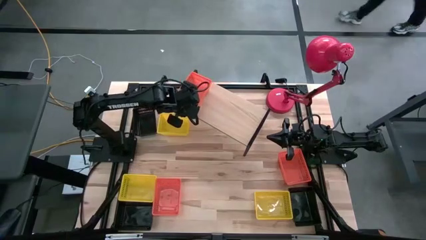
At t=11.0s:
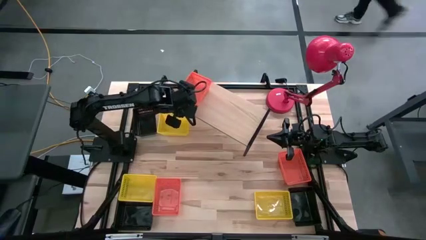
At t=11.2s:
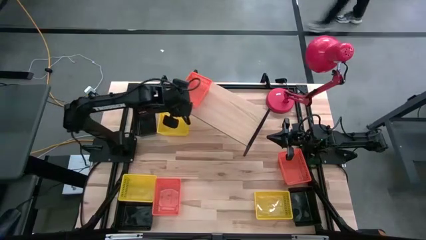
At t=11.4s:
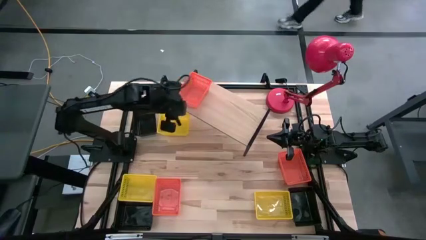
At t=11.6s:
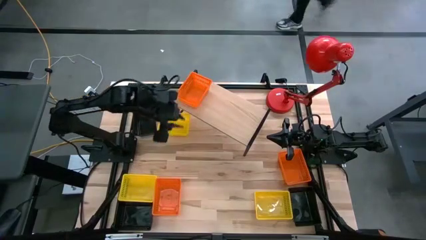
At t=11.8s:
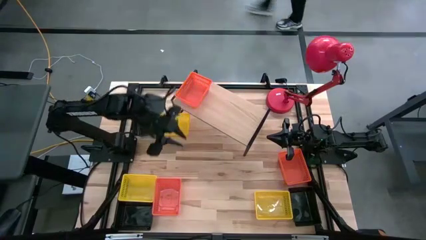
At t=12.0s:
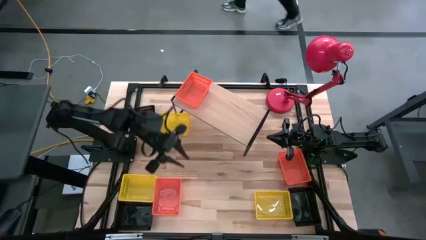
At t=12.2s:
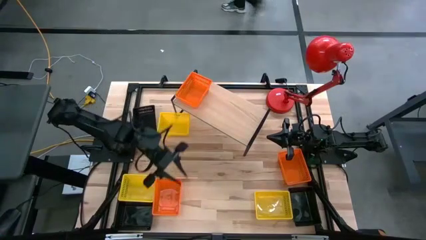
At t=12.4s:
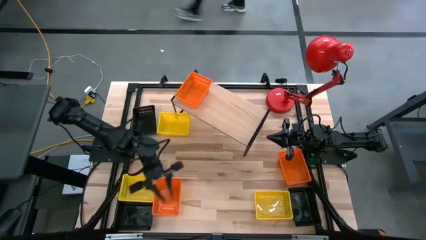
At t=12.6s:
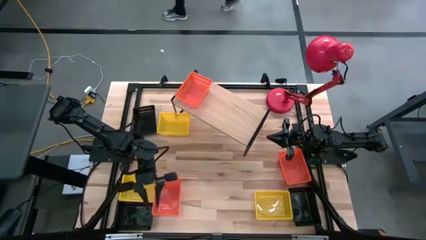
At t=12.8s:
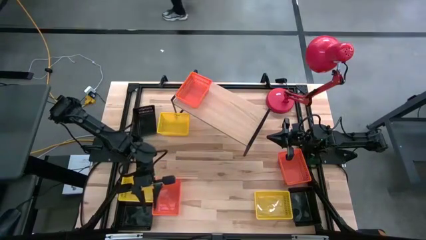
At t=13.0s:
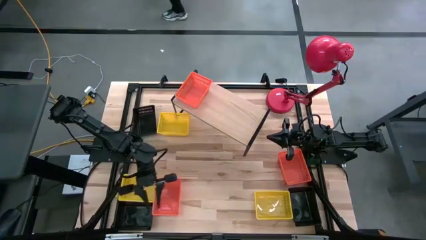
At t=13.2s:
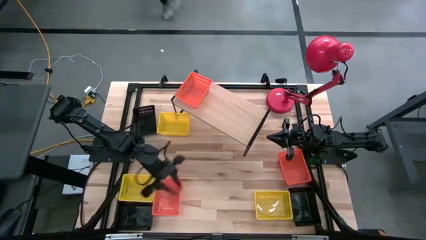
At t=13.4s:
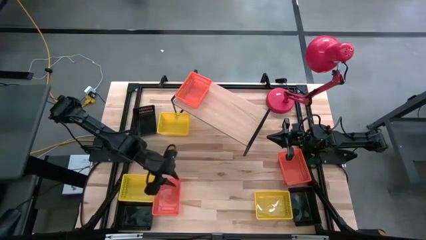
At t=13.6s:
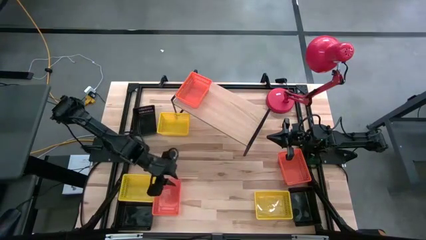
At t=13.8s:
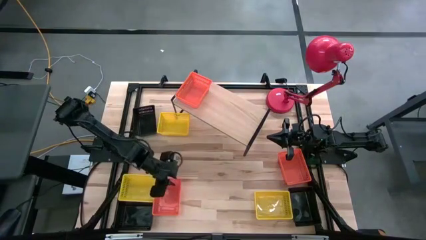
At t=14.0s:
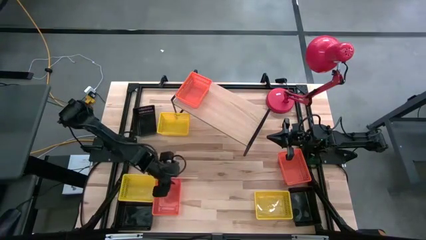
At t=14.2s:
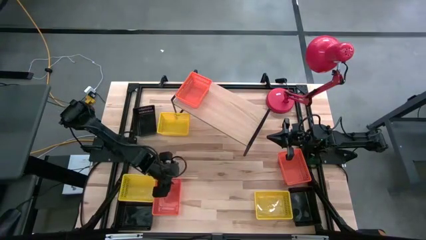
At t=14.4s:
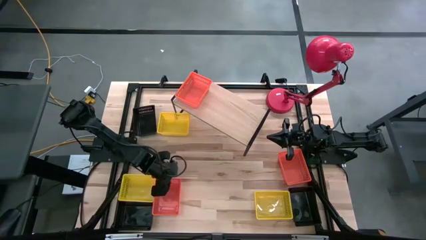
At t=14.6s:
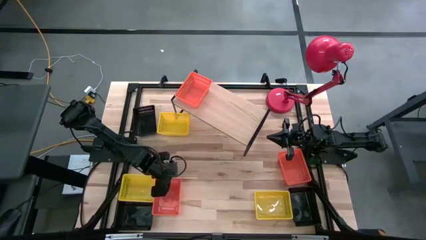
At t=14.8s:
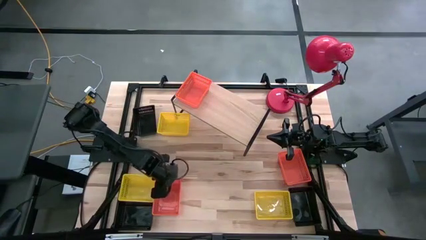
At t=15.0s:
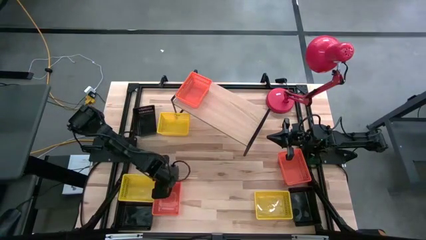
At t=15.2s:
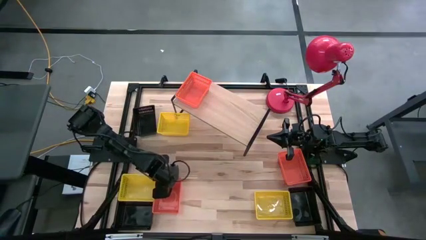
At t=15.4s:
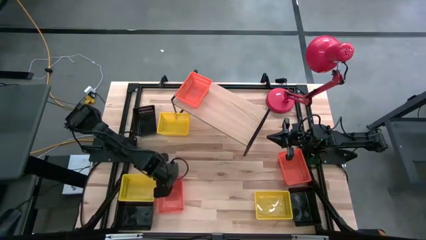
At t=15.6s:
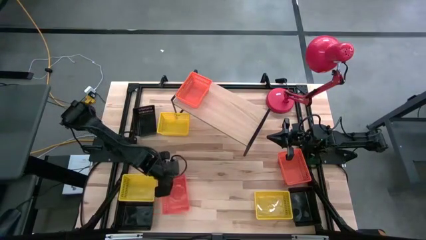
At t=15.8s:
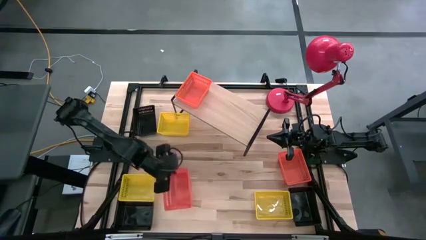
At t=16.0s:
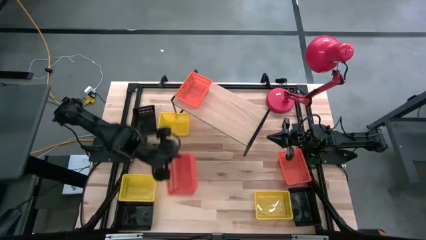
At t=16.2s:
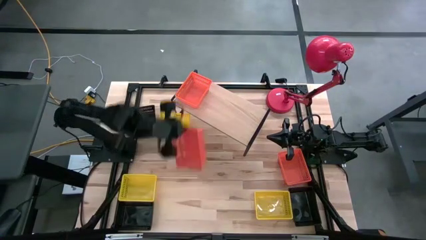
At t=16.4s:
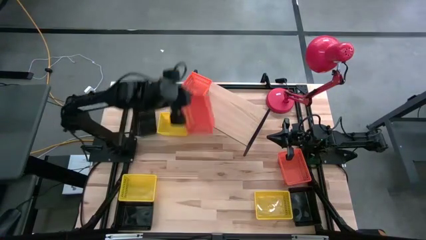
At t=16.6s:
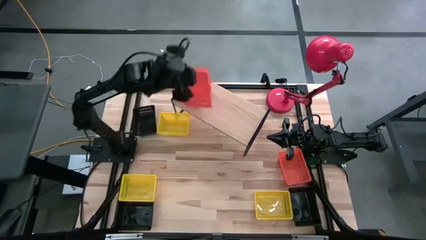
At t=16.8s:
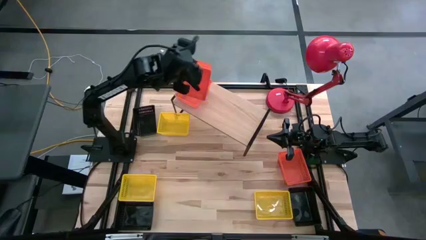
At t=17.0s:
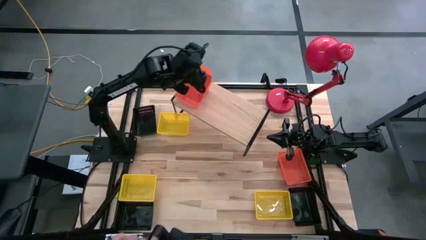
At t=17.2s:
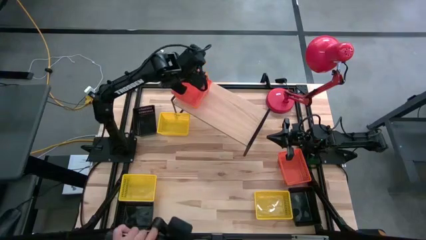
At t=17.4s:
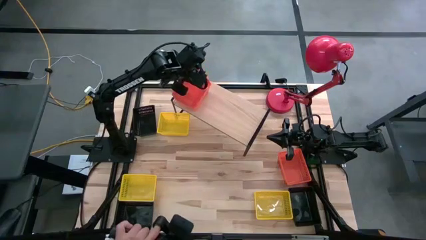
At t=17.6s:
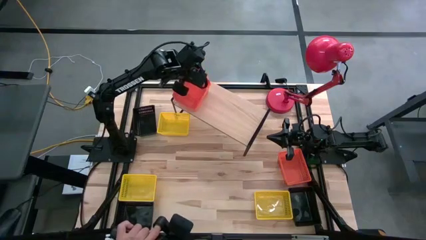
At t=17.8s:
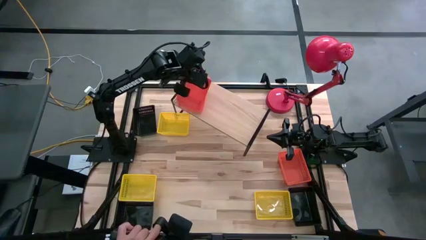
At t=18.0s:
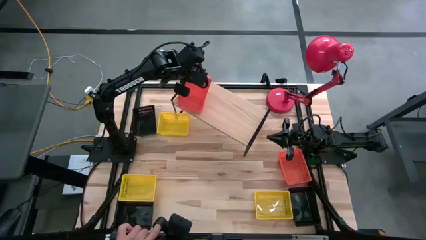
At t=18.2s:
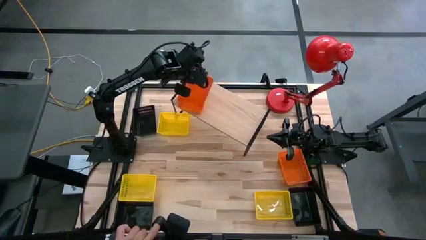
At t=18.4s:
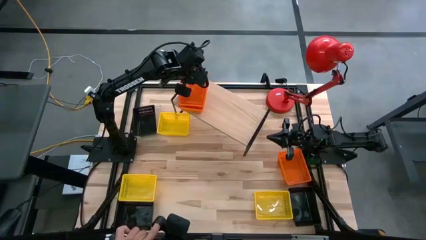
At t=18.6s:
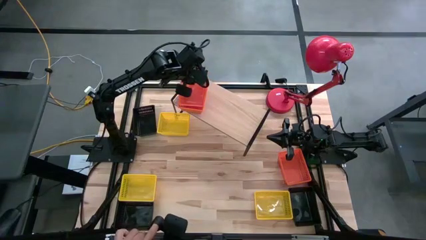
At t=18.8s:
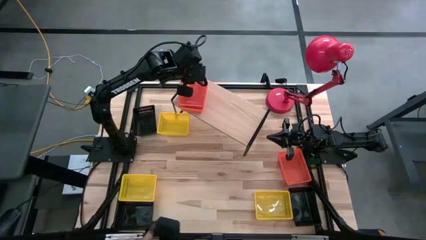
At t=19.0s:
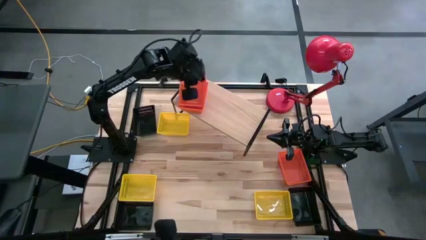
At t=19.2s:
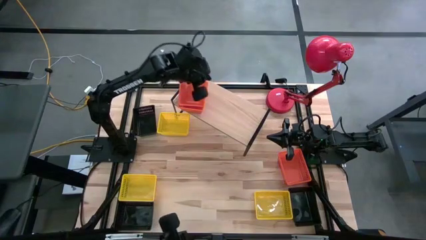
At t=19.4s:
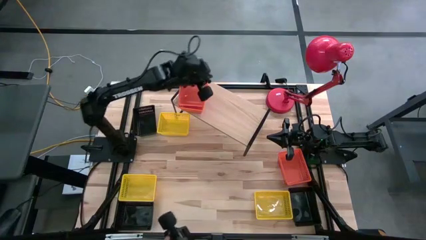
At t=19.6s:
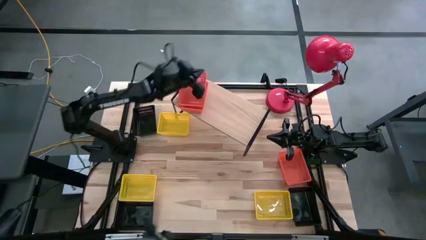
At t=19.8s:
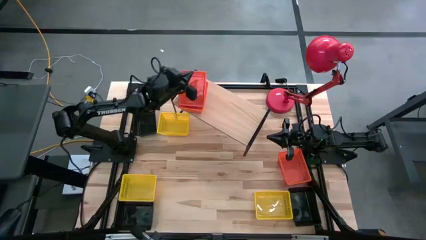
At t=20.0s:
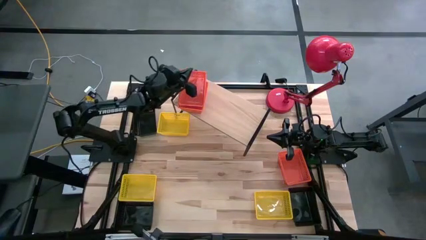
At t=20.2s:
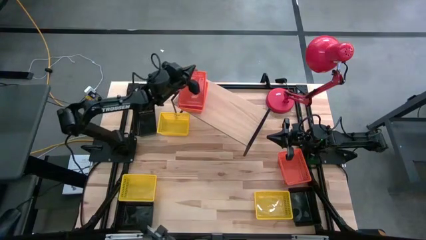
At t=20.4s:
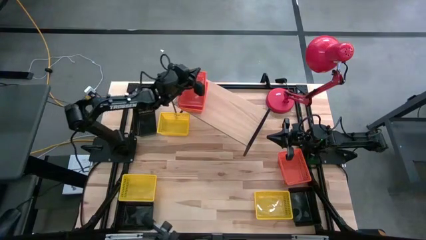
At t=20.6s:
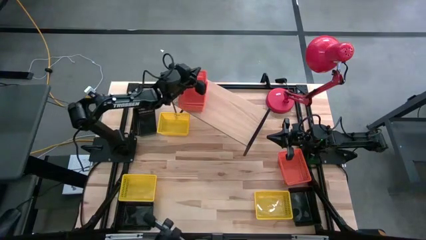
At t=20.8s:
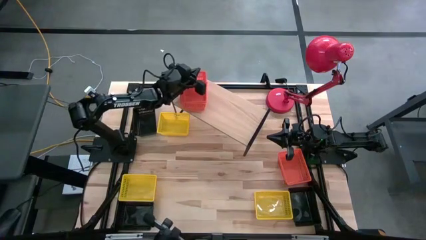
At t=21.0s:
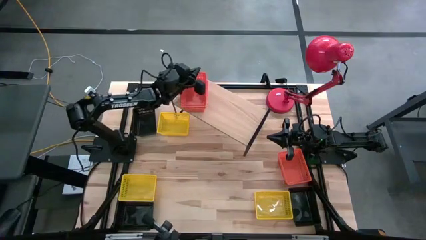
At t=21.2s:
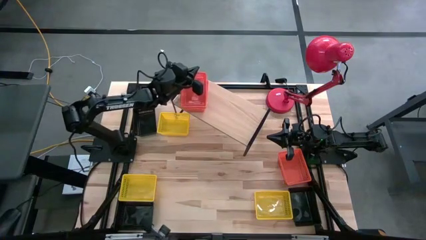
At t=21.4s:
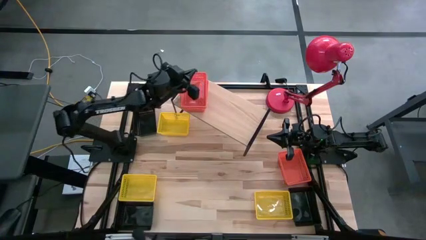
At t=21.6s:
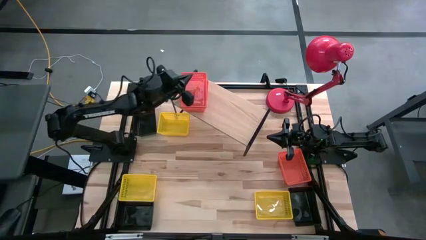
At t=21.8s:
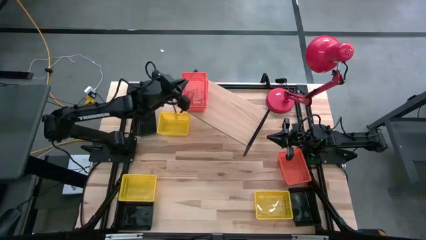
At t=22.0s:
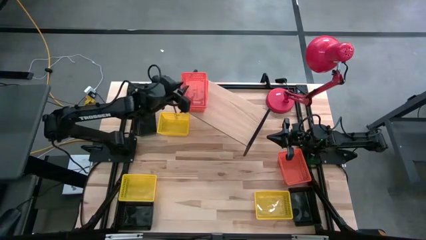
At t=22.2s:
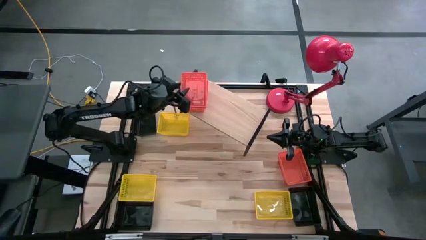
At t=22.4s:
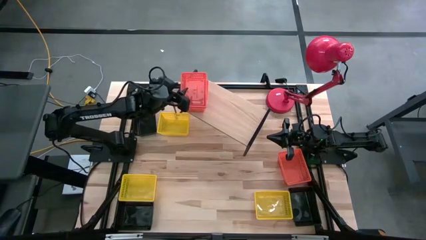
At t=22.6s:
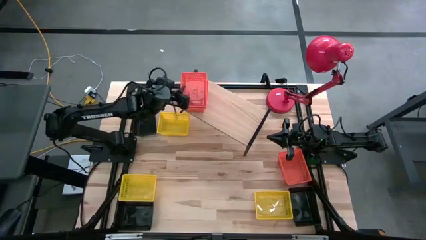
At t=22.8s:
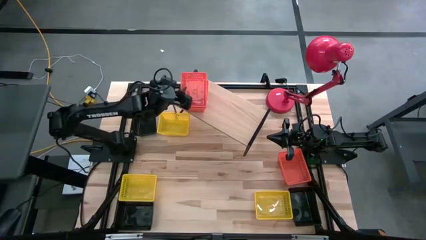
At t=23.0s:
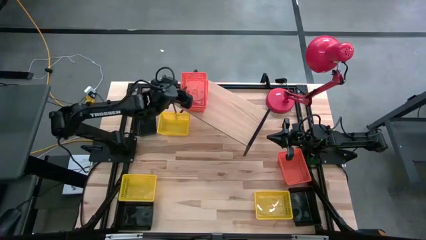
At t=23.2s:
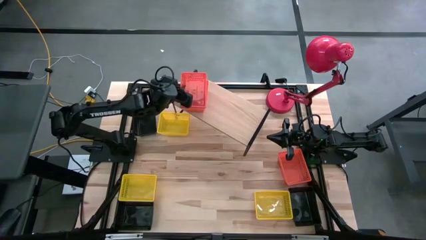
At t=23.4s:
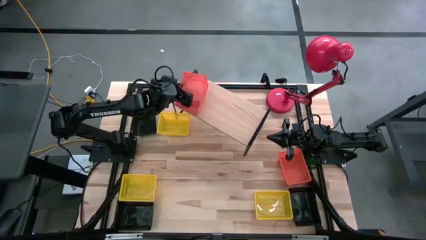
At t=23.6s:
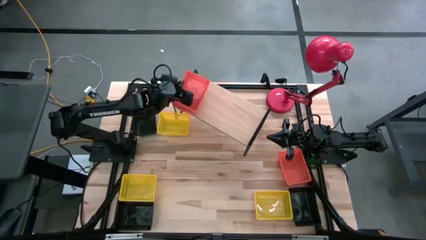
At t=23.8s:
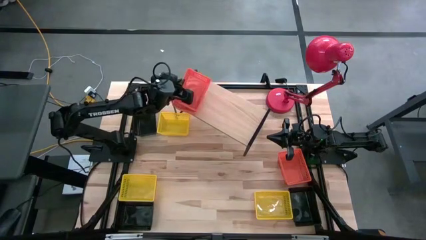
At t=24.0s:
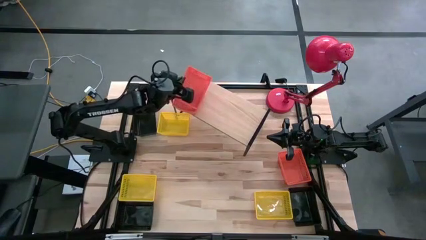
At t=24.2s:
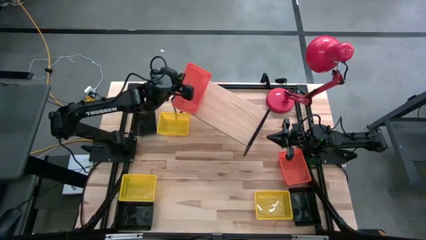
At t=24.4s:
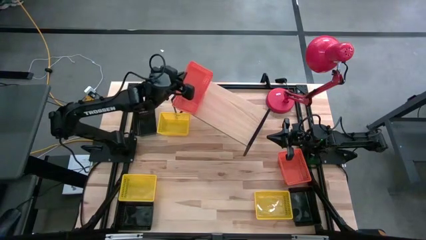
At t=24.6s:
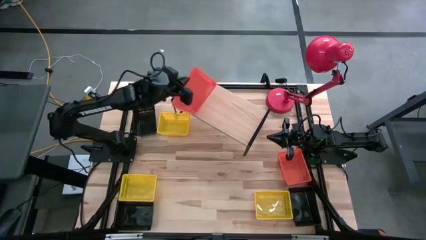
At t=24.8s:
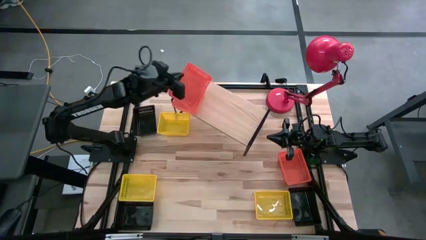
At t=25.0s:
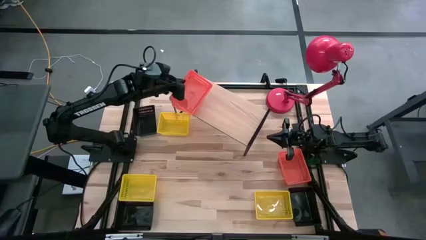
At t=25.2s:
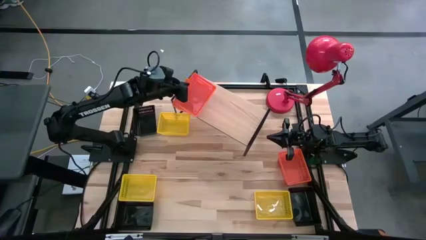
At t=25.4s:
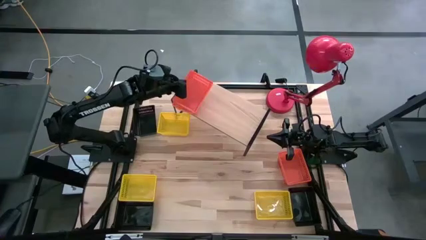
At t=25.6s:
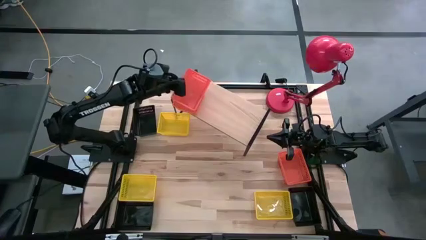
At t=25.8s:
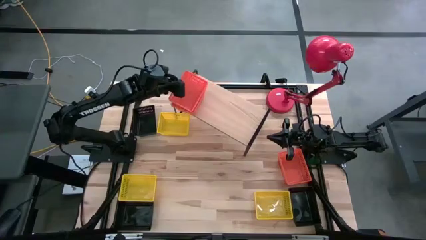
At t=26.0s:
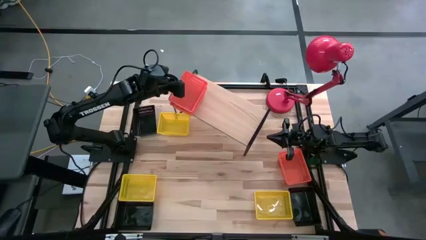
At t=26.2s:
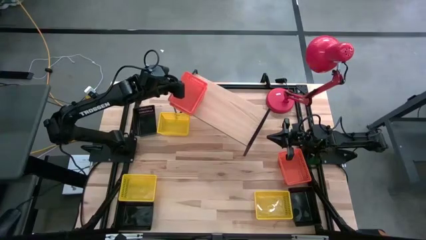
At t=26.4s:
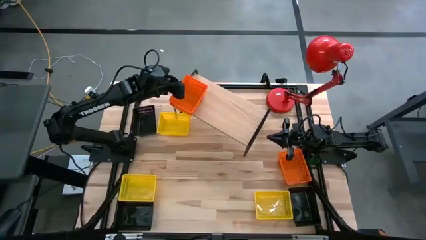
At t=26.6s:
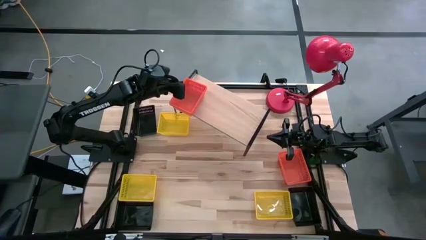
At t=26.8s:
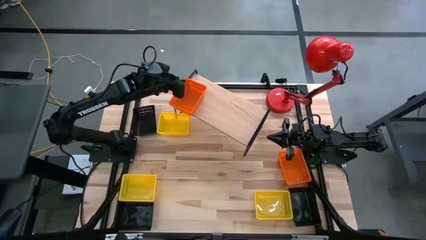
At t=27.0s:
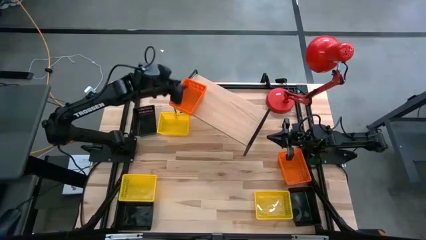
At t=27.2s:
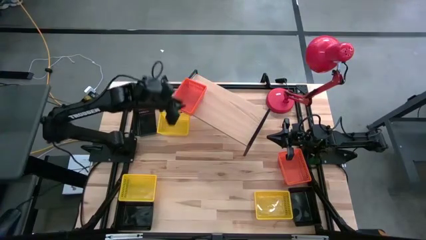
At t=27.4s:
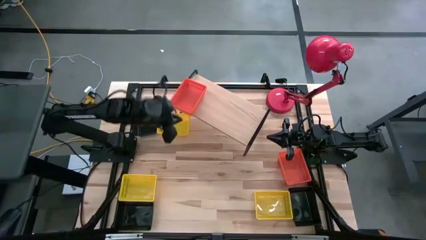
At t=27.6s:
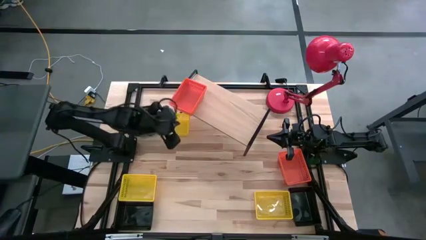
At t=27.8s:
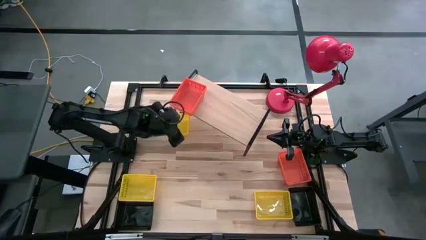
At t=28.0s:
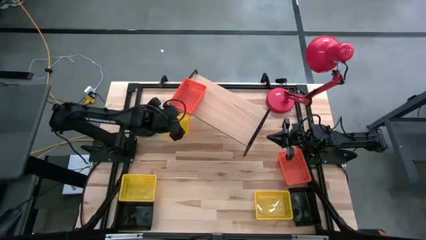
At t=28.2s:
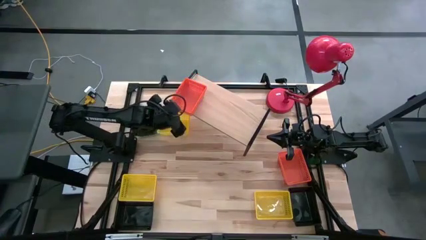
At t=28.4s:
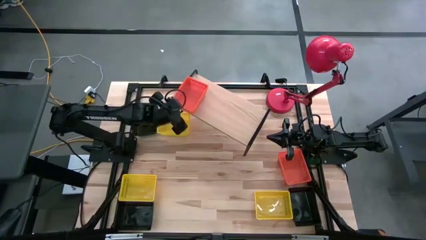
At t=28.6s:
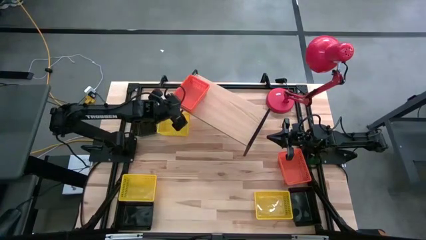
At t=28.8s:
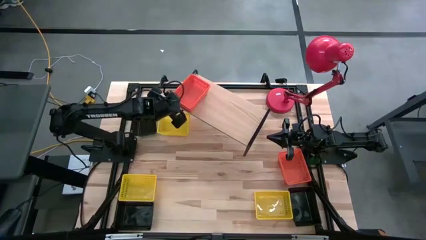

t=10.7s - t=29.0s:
Task: Stack baskets on shelf by color
Stack the left orange bin on top of the orange bin on the shelf
